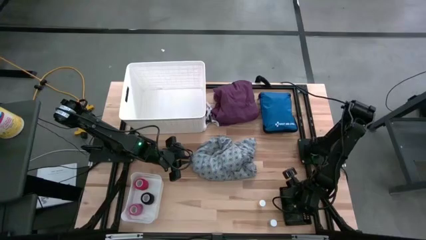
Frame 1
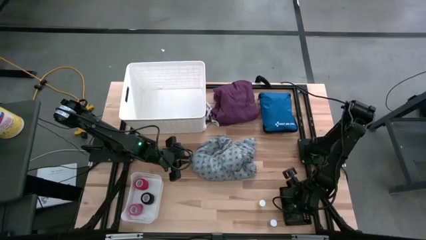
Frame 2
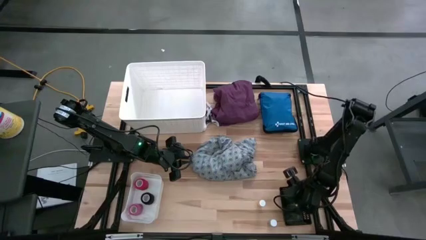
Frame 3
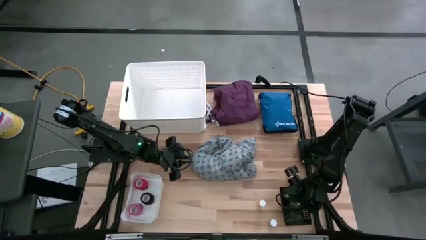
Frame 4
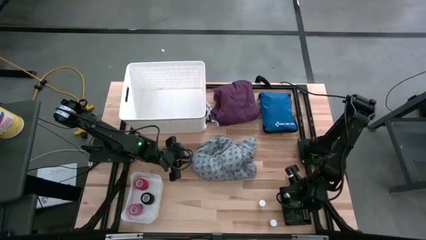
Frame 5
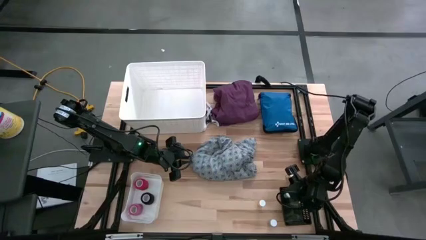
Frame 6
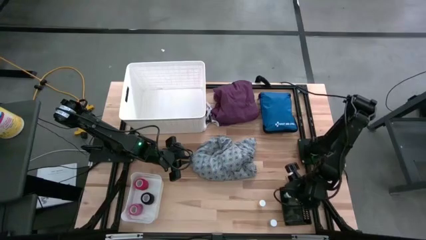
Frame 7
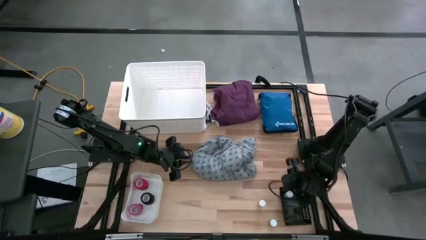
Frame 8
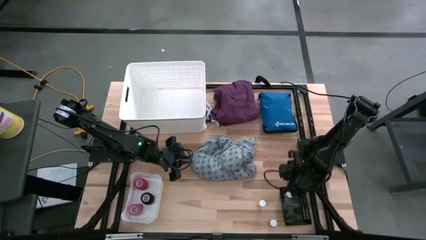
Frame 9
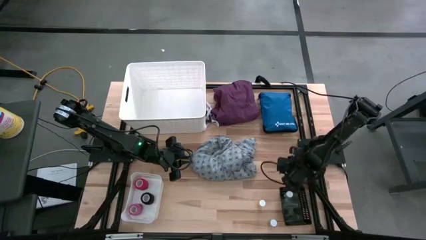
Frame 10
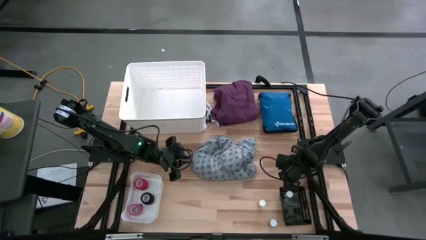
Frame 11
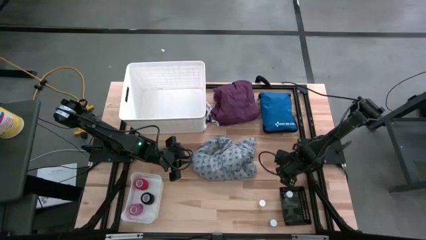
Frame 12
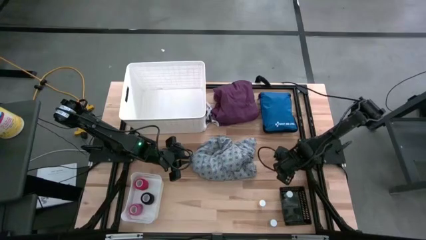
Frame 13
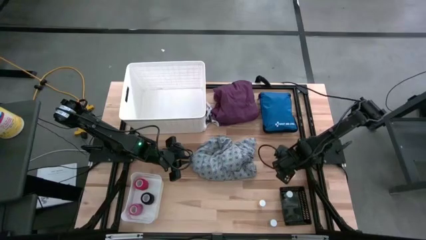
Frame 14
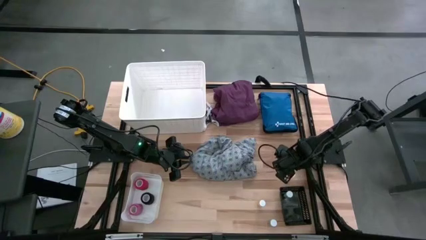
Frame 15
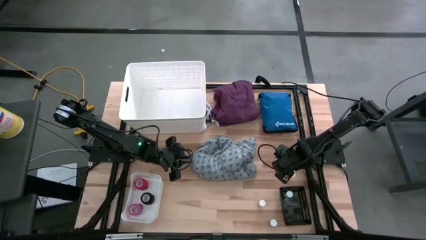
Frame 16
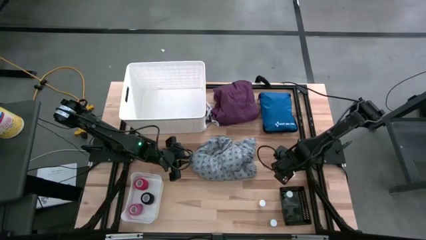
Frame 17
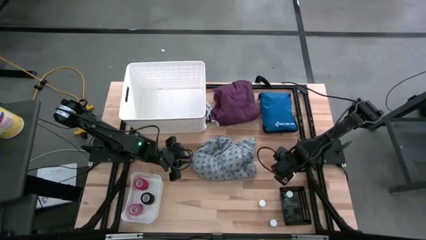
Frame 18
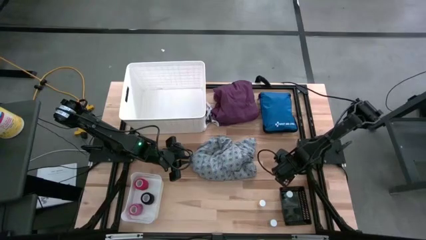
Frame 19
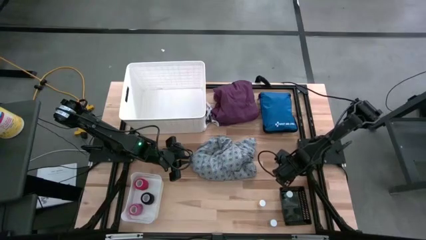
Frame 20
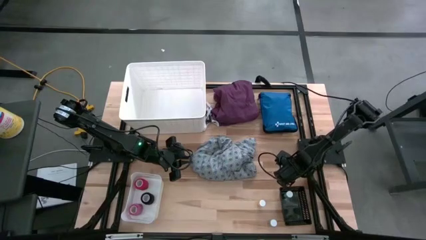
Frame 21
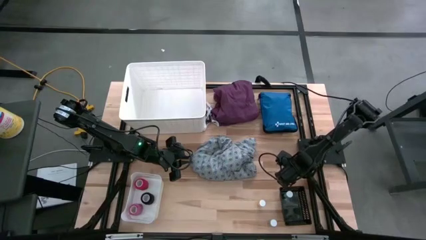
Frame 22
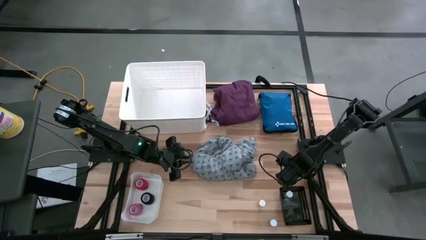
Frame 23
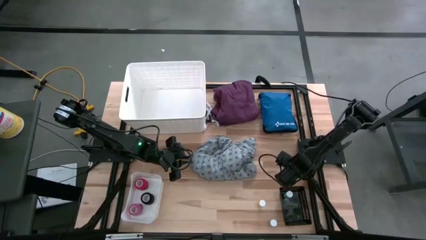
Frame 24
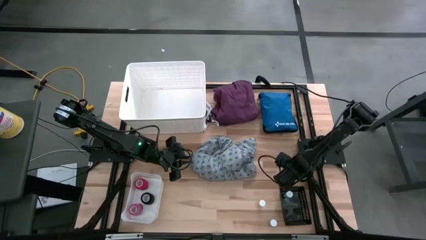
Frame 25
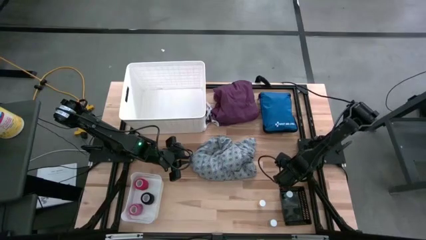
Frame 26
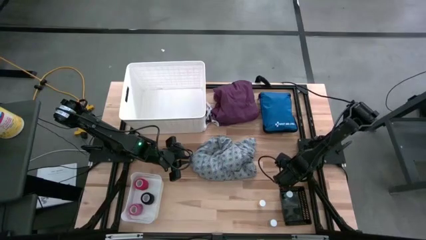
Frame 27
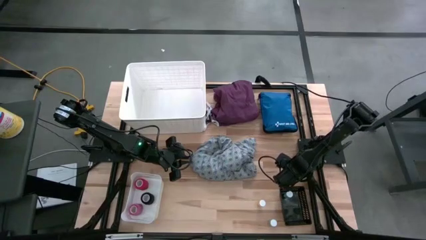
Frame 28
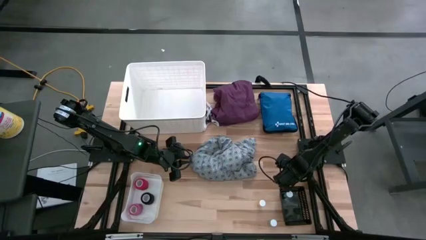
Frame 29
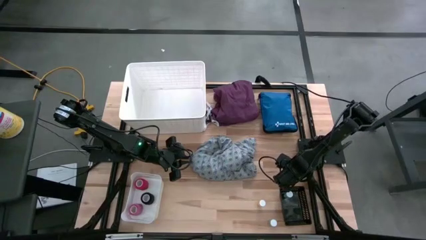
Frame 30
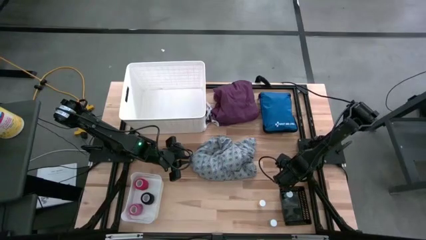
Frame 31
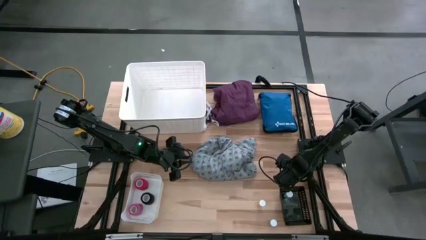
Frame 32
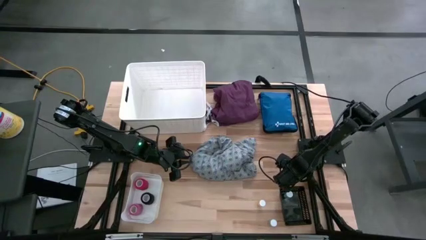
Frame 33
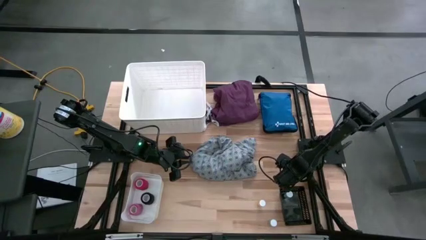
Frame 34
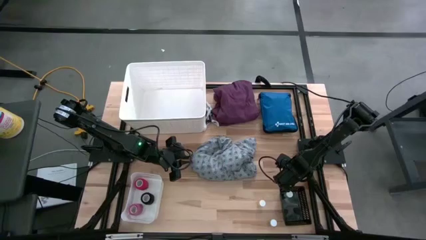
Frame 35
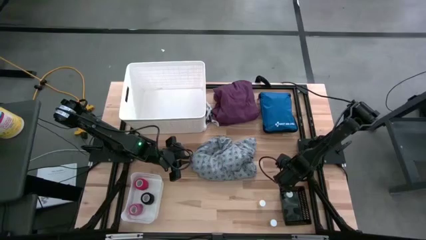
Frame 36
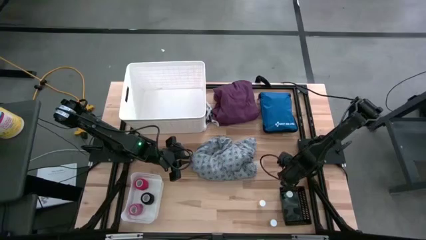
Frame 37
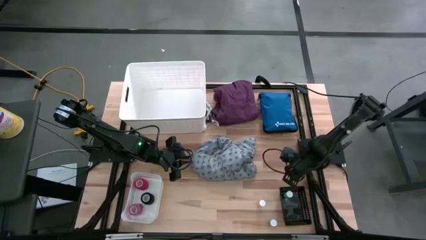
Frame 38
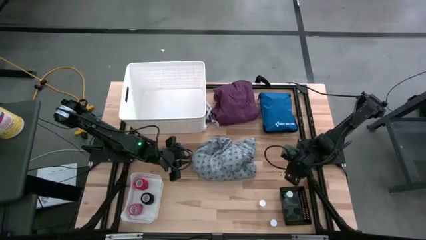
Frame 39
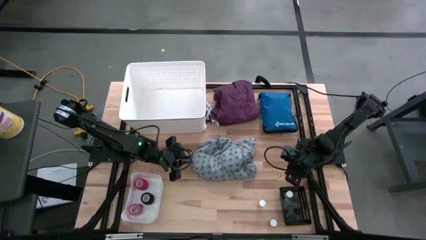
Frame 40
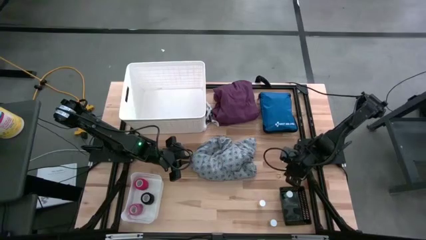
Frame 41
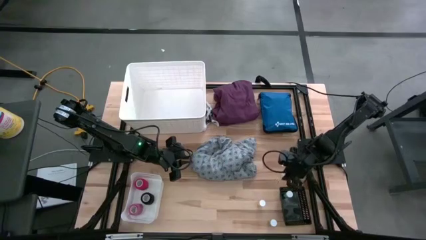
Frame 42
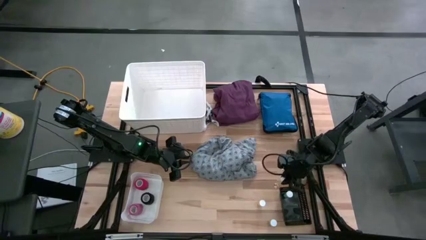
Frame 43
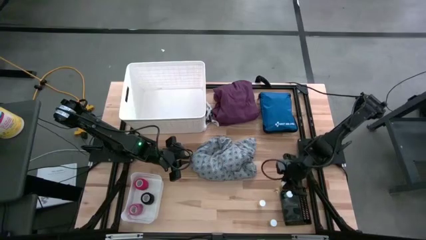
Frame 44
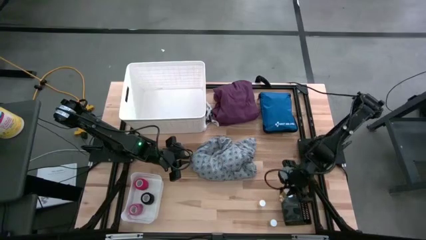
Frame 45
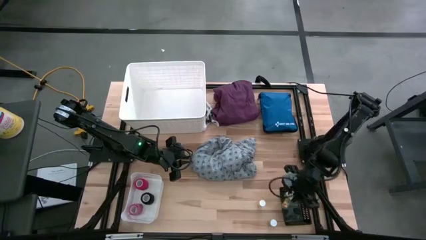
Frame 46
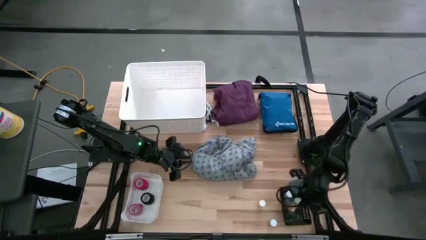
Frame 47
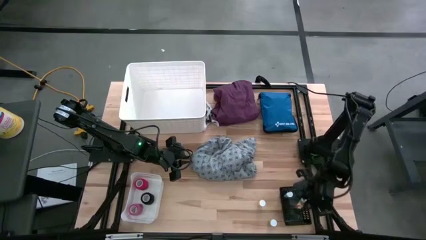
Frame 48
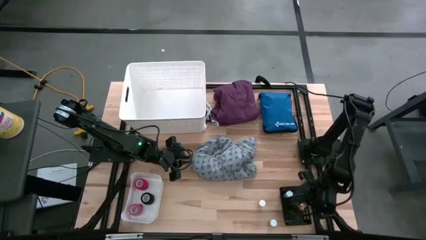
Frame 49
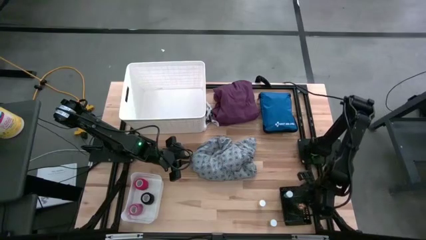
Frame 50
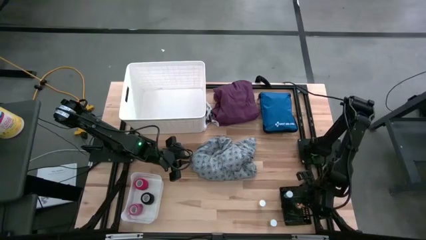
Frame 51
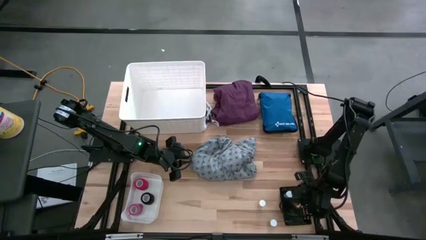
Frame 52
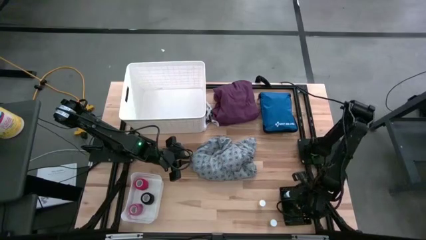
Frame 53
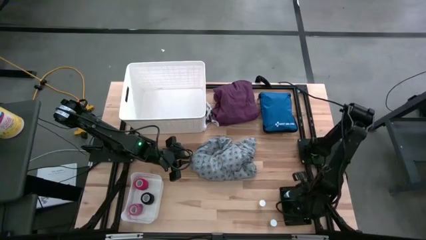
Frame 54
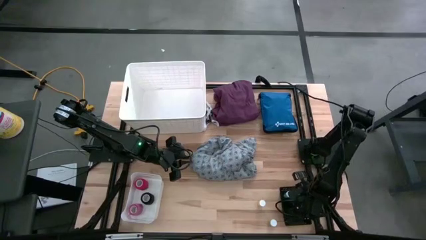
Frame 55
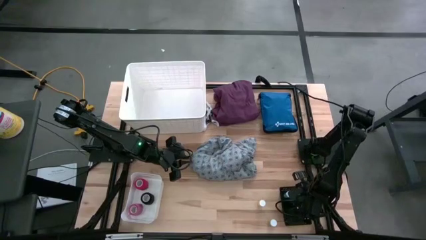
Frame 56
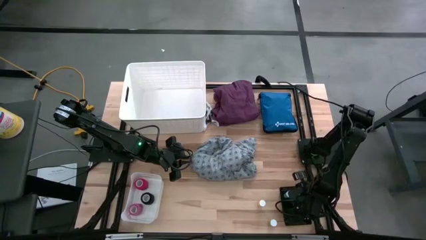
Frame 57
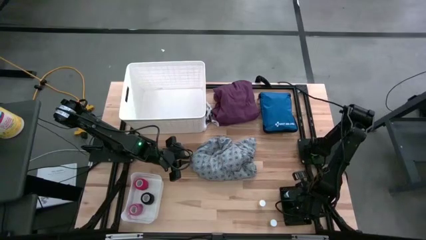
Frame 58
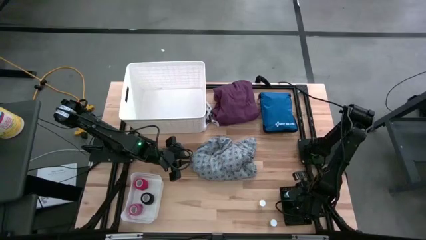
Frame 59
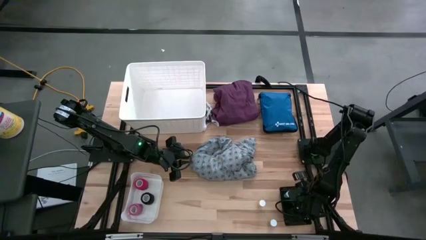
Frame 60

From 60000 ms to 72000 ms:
Task: Pick & place medical supplies in basket/bin
Put the top yellow pill bottle into the black bin
